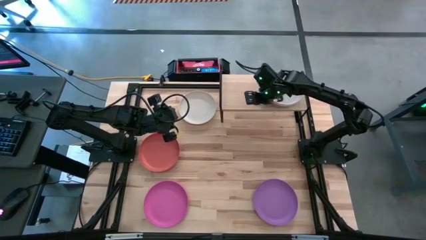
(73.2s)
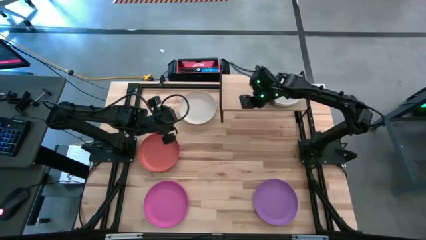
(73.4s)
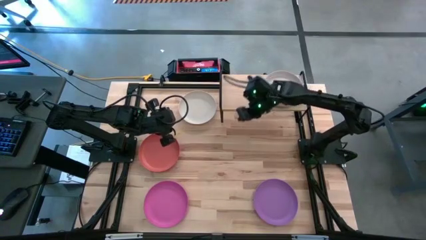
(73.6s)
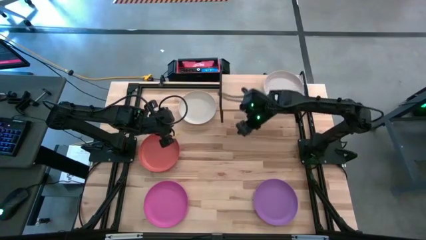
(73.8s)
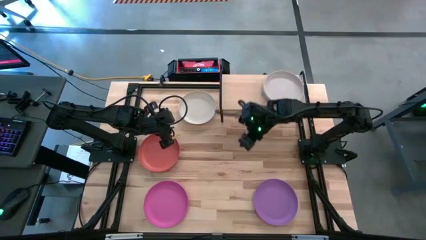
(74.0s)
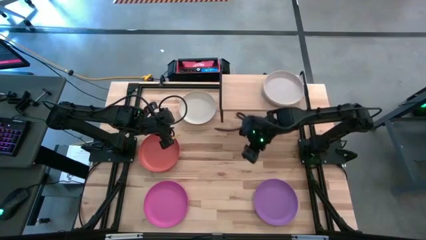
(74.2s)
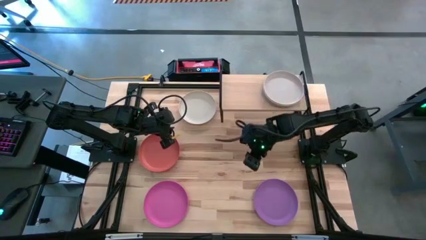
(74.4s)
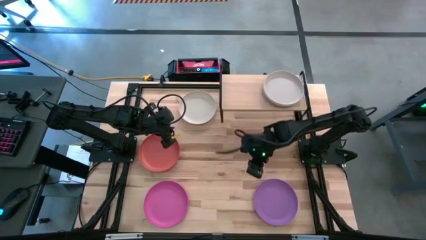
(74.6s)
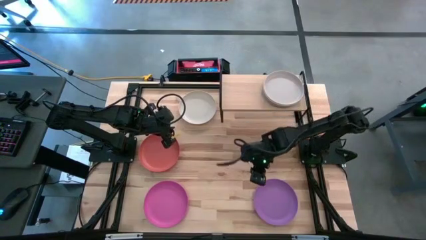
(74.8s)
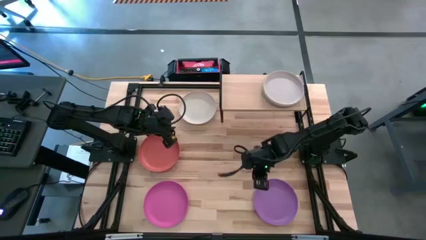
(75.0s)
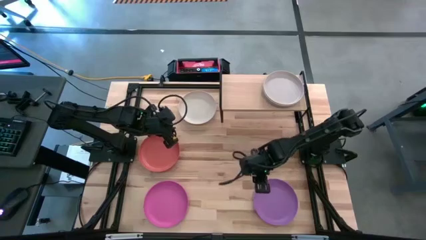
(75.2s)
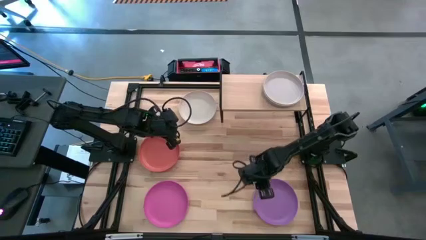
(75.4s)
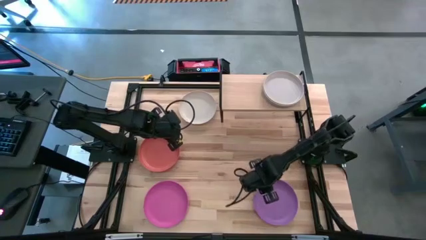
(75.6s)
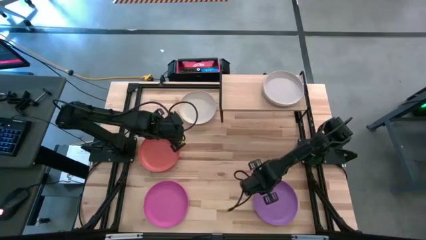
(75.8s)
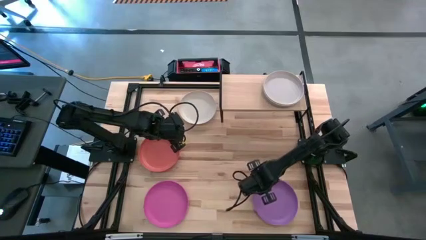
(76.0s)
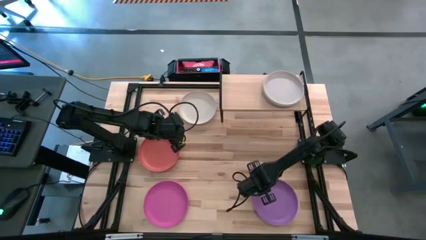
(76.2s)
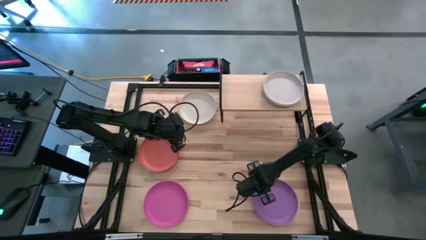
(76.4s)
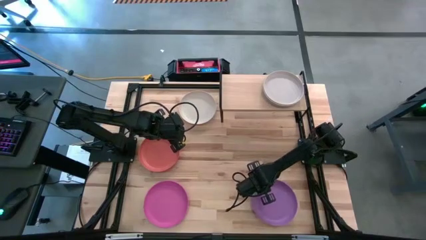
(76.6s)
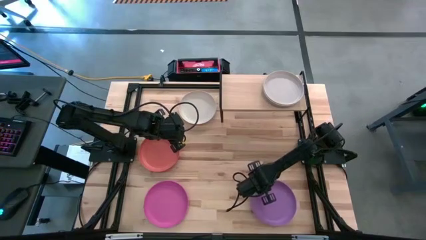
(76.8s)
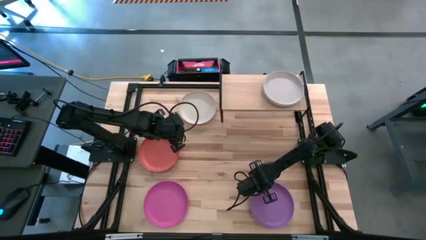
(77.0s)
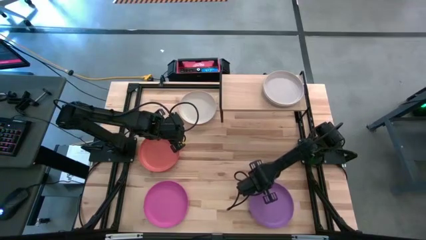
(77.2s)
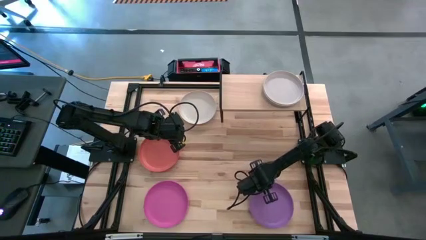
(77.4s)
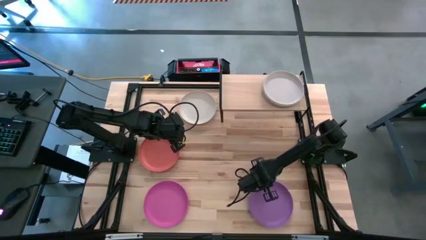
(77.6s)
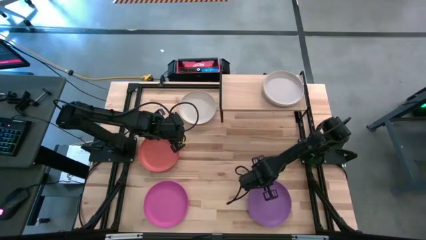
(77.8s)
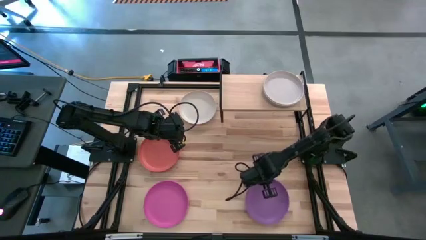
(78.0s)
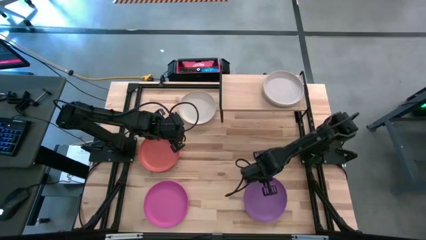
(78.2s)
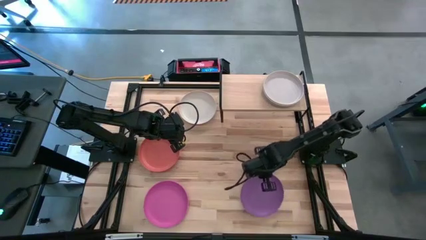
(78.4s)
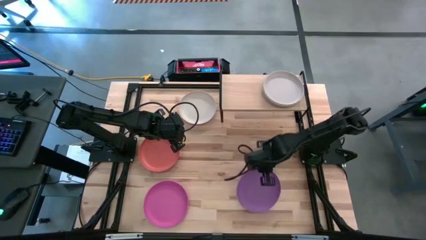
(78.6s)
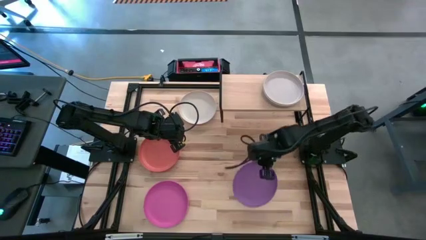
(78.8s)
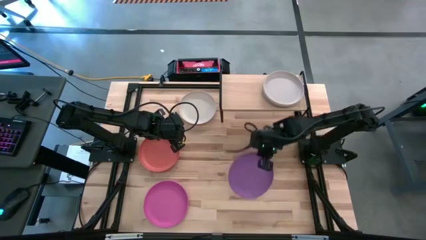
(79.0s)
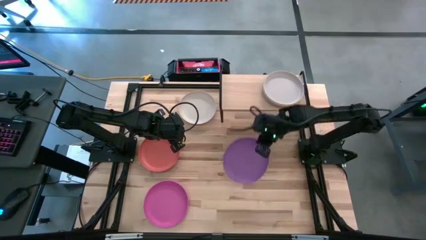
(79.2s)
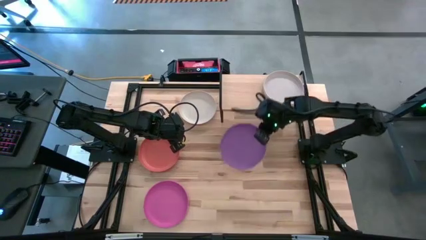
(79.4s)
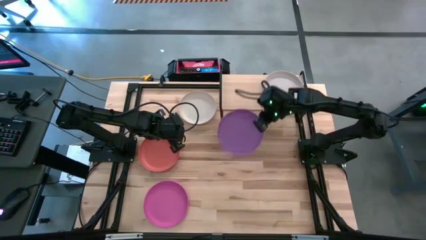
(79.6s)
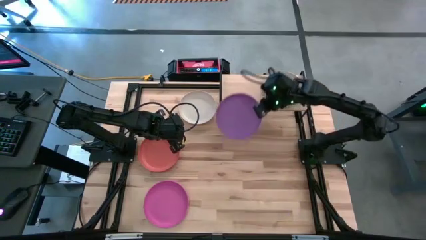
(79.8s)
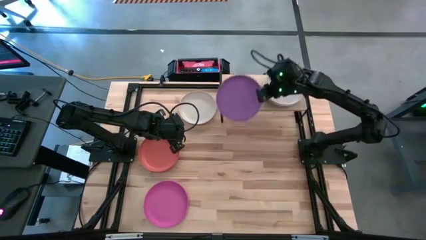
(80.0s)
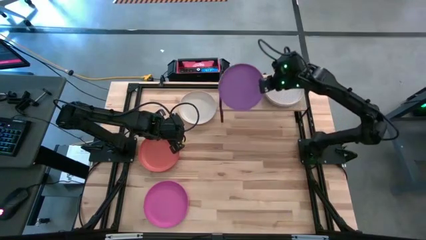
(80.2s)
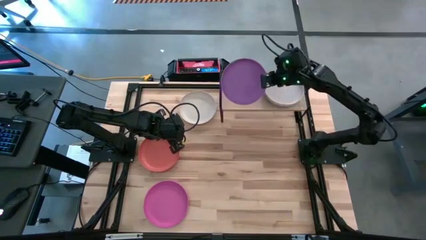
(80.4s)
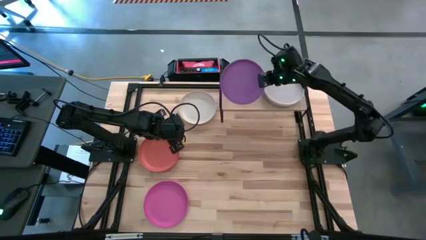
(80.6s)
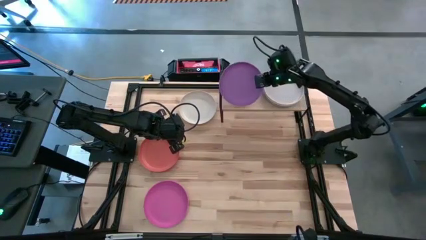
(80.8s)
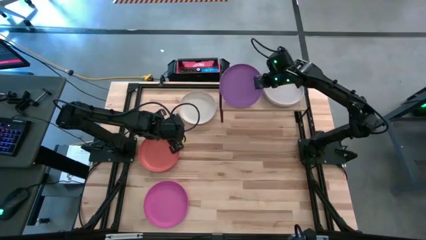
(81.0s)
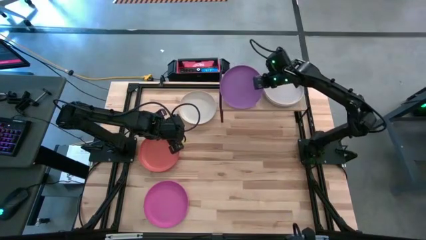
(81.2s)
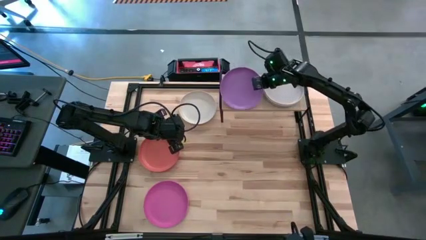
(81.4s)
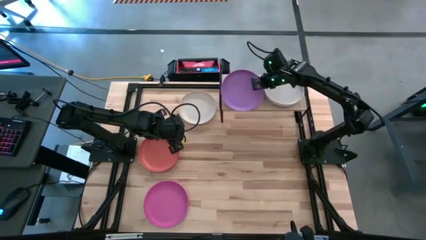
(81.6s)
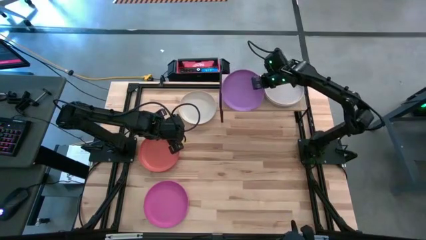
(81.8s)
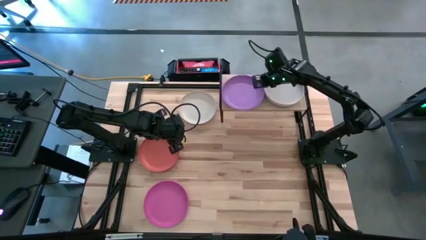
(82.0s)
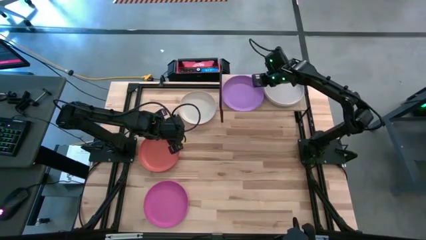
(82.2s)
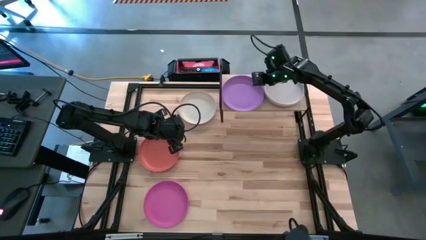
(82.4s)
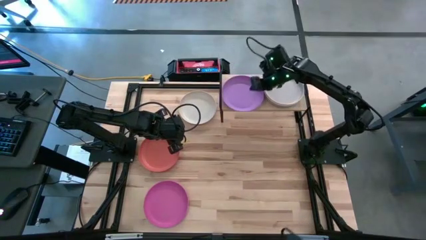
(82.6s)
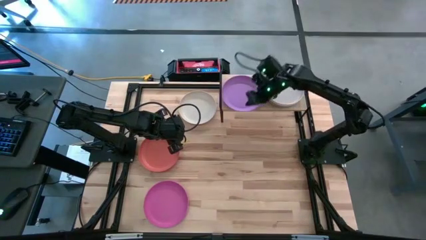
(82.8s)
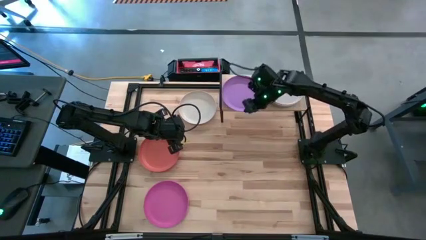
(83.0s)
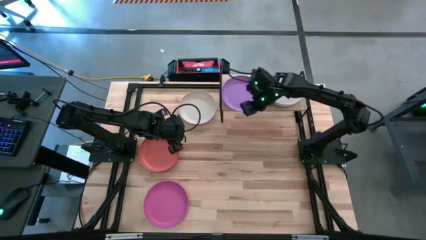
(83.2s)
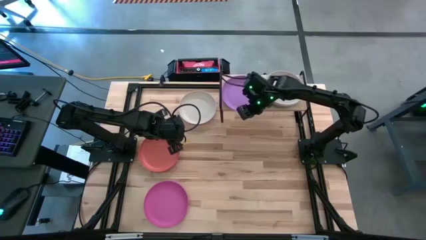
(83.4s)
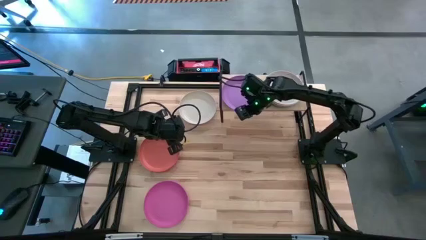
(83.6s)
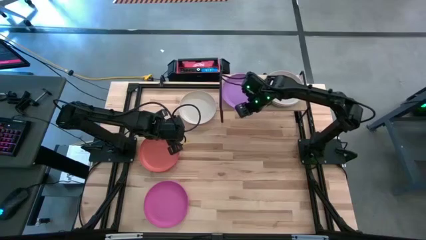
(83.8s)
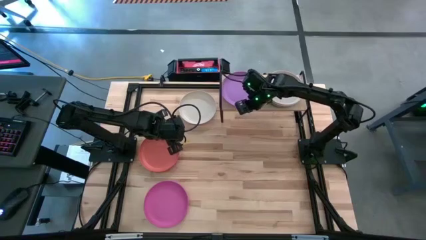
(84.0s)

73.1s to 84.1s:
Task: Place and stack plates onto a shelf
Put the violet plate on the shelf

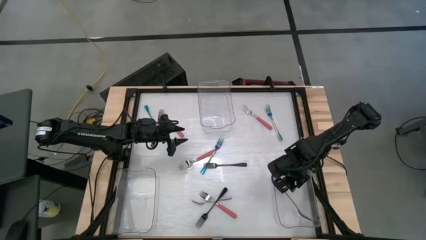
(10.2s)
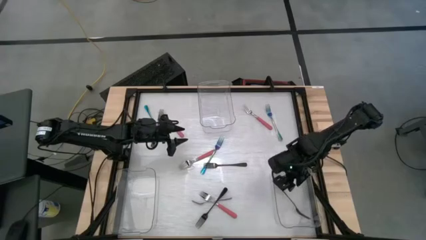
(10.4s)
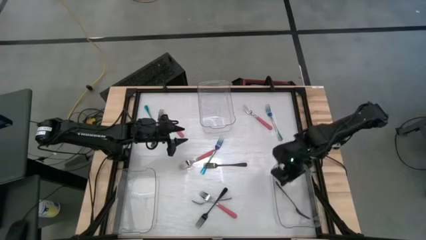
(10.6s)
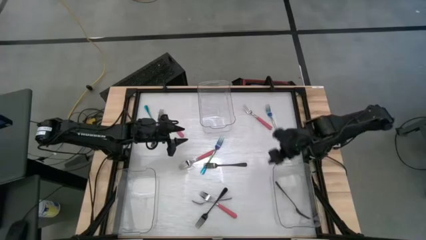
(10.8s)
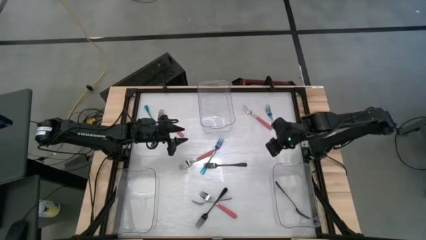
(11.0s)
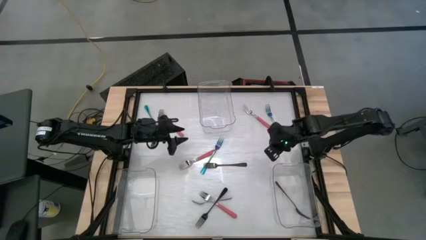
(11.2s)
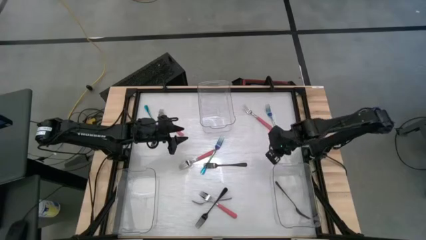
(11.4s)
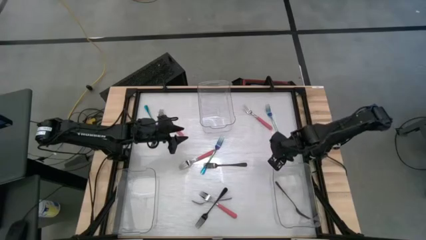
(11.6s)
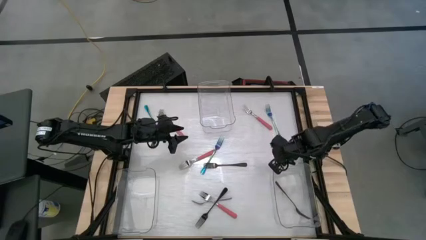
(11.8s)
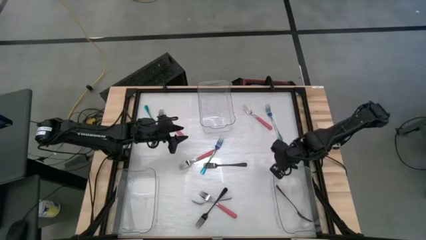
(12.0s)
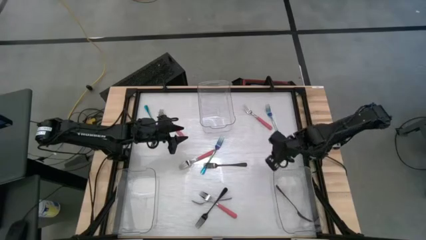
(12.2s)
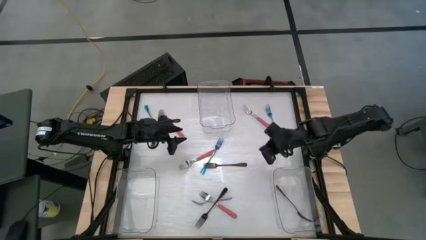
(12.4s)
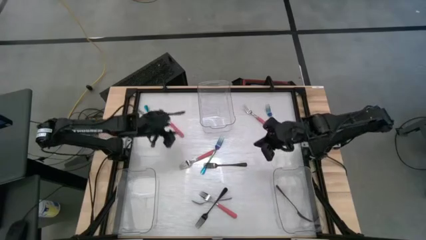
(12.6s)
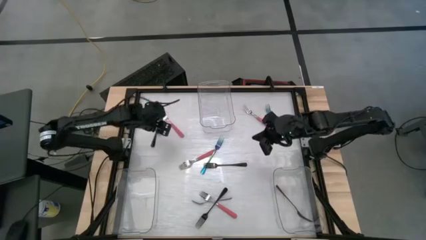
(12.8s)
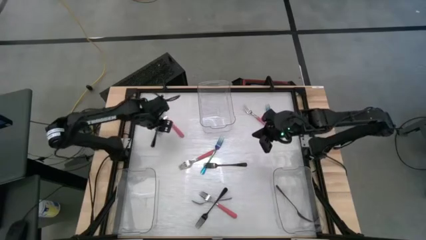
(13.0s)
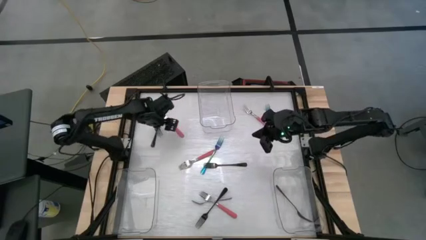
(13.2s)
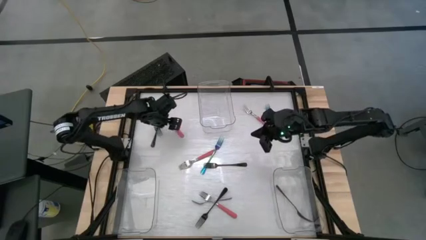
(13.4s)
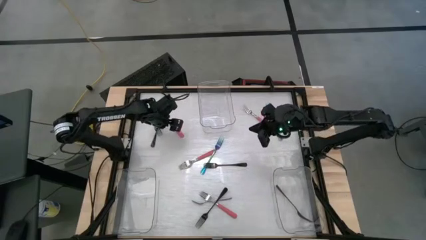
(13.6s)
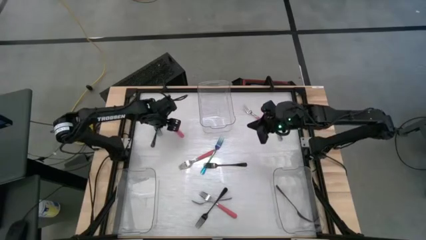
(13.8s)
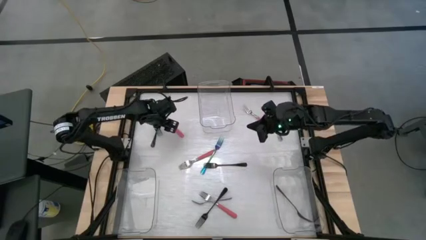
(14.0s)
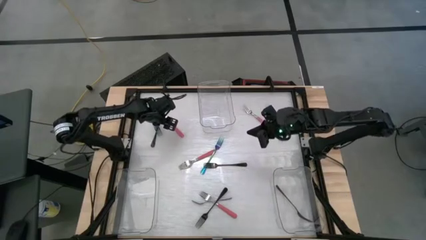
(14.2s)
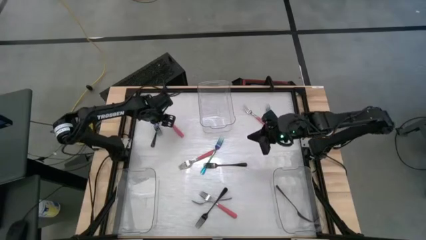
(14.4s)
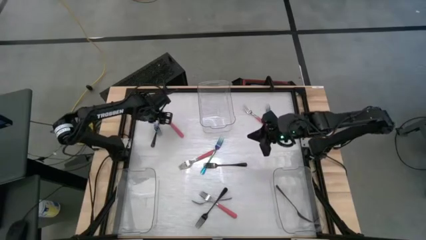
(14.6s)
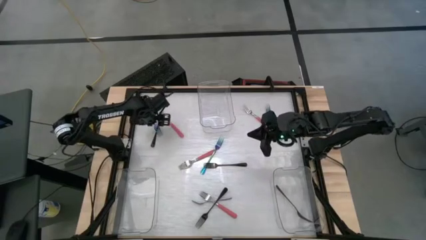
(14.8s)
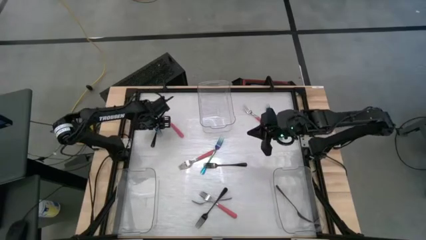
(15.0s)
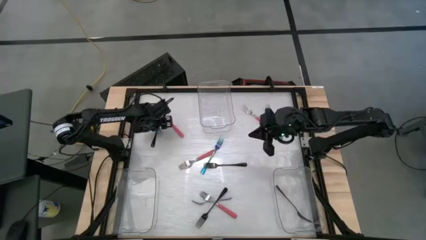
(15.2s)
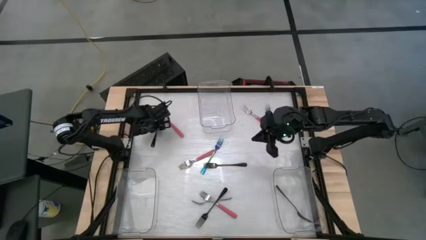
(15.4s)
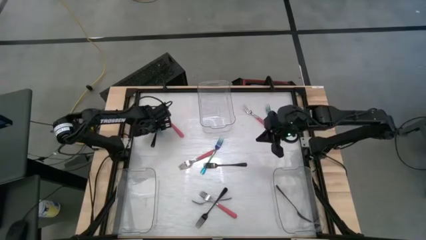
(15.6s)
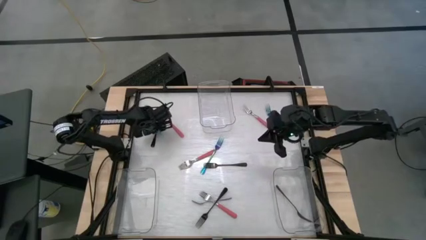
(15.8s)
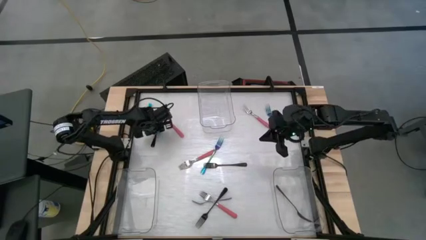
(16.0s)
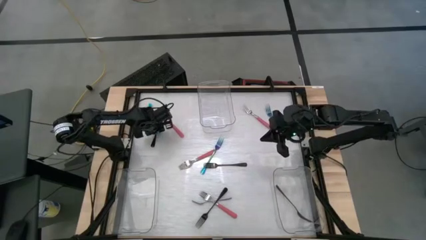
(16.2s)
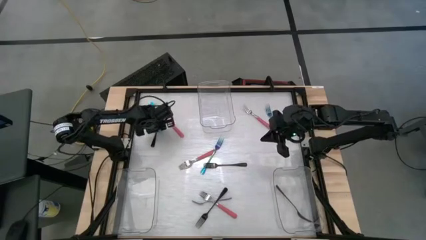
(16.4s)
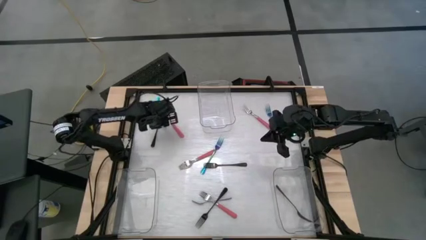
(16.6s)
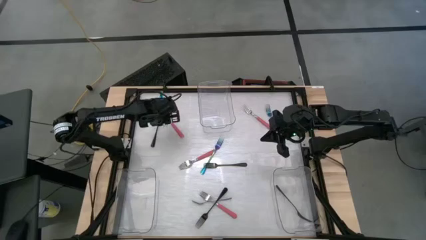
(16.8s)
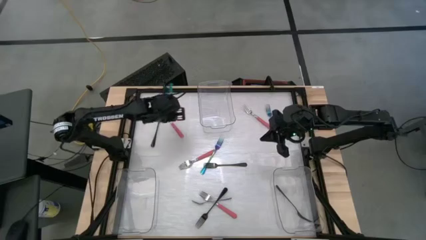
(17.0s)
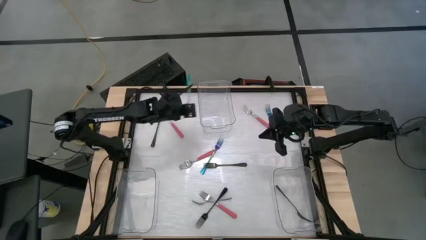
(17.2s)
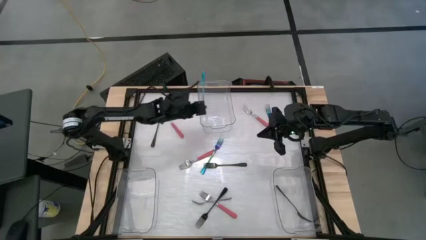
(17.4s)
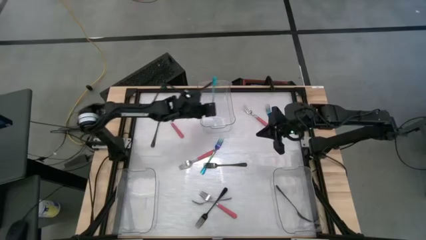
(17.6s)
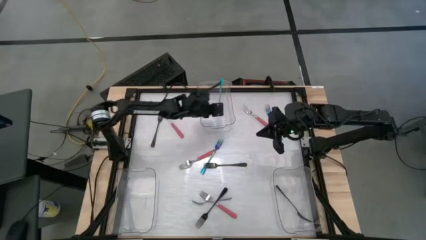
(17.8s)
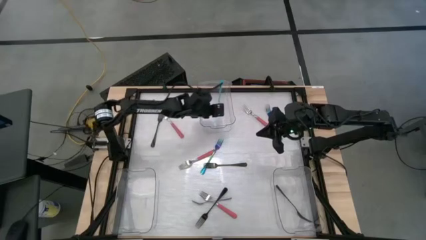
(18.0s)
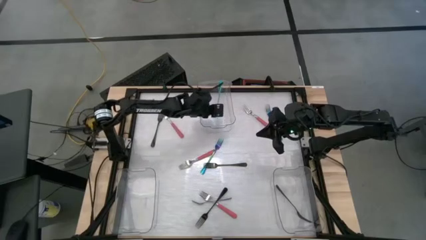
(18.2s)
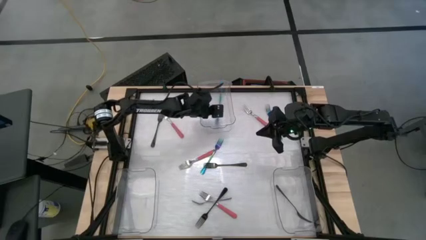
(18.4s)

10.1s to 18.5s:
Task: Sort silverware by color (type)
Put the titanium rainbow fork into the top transparent bin
